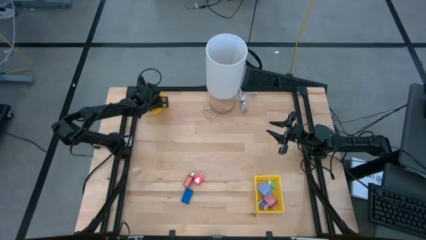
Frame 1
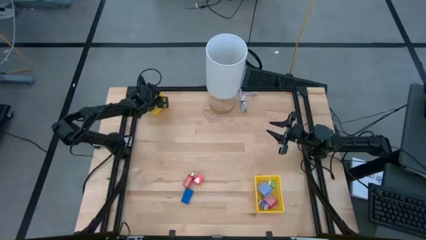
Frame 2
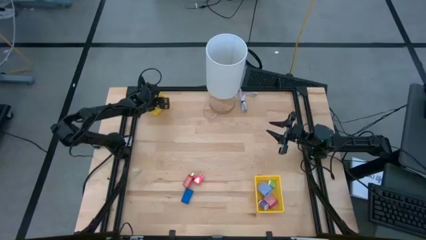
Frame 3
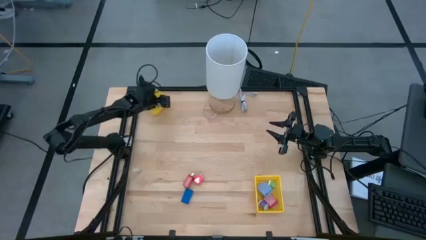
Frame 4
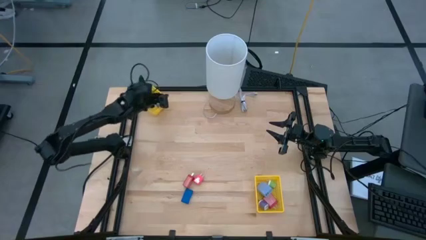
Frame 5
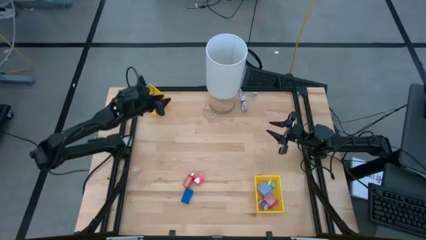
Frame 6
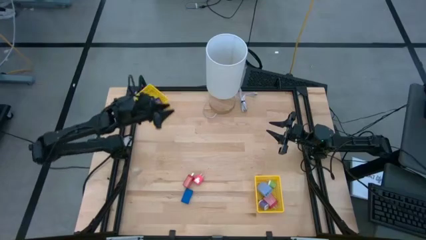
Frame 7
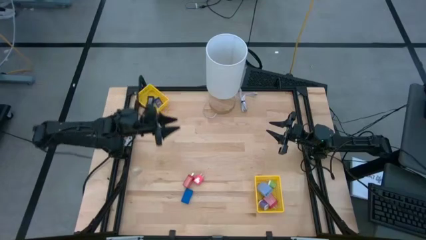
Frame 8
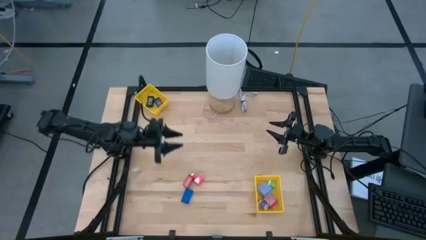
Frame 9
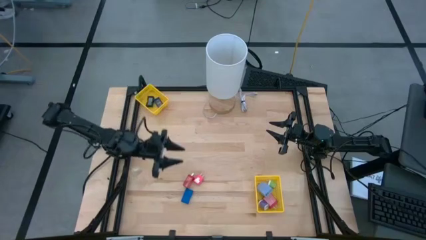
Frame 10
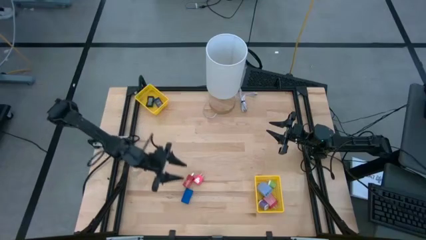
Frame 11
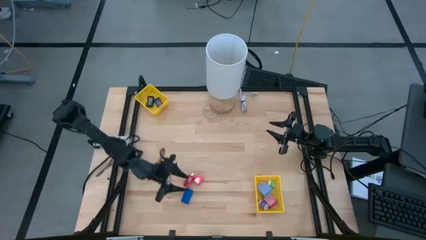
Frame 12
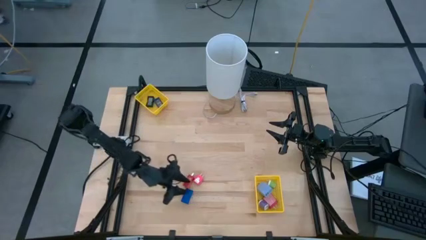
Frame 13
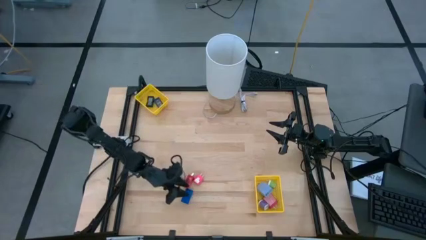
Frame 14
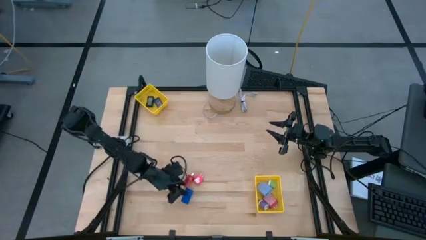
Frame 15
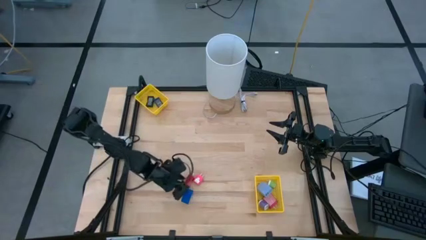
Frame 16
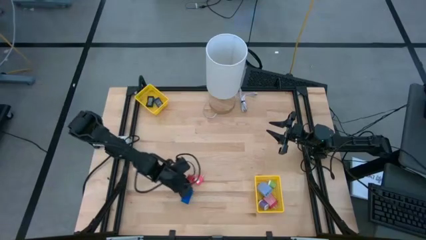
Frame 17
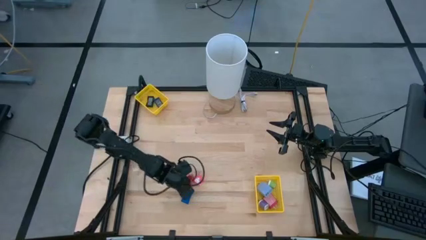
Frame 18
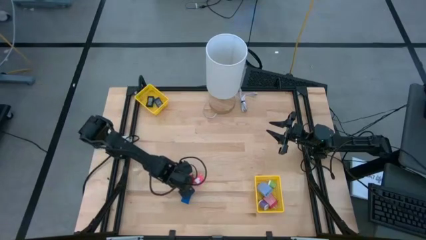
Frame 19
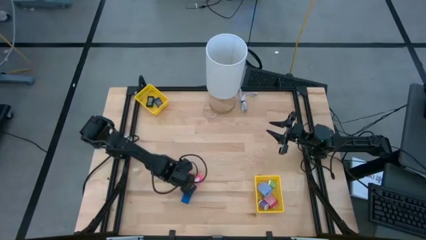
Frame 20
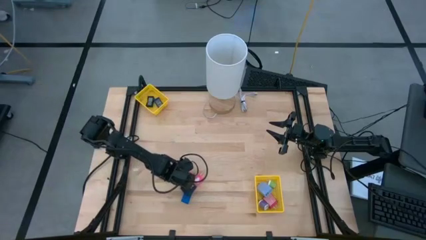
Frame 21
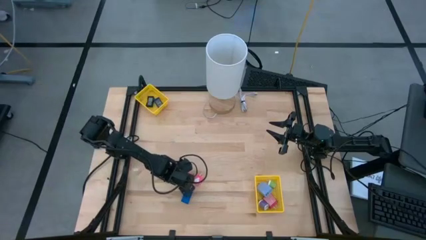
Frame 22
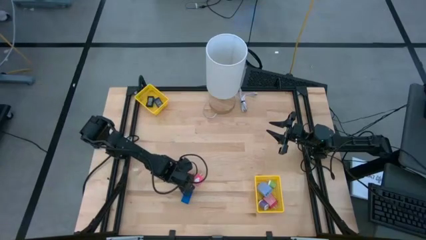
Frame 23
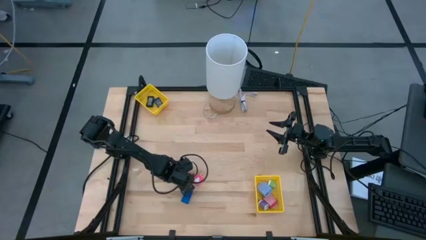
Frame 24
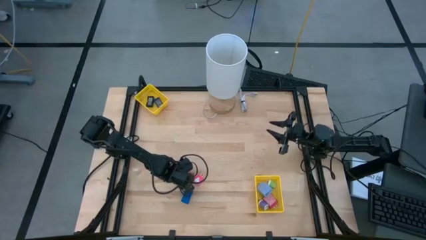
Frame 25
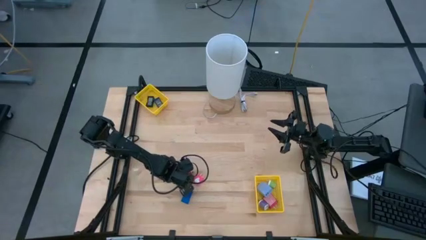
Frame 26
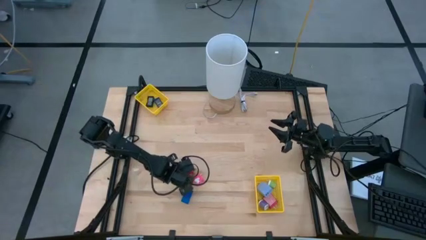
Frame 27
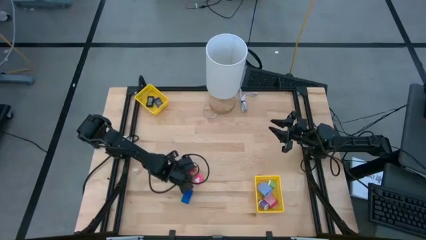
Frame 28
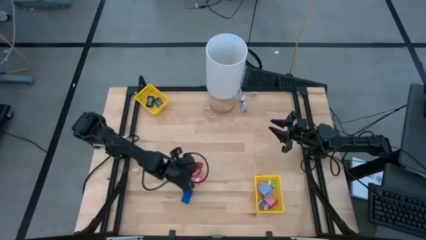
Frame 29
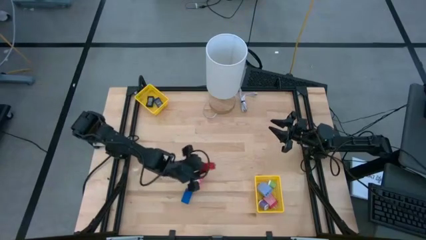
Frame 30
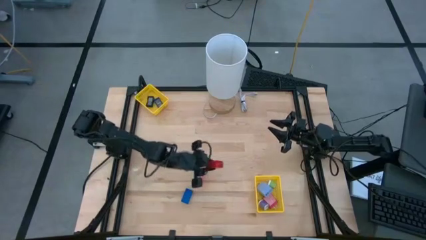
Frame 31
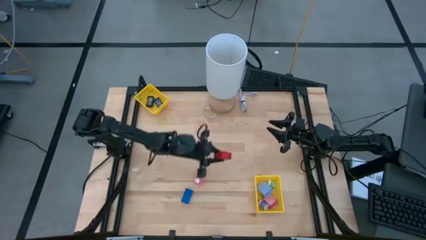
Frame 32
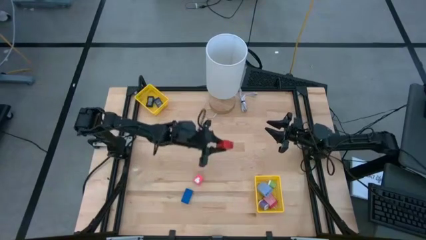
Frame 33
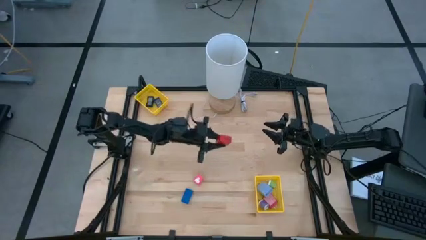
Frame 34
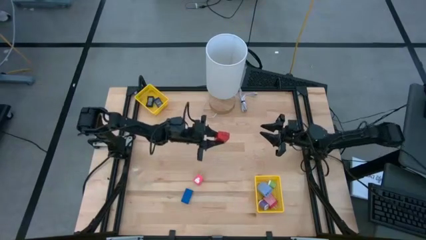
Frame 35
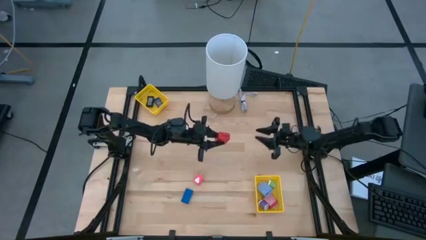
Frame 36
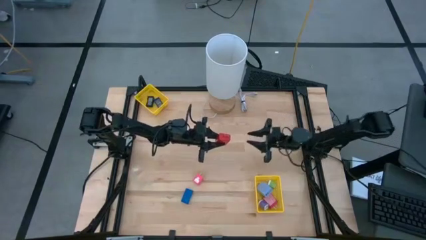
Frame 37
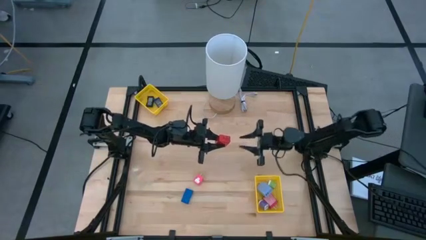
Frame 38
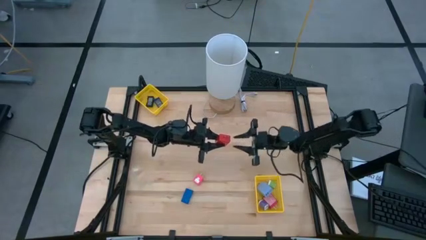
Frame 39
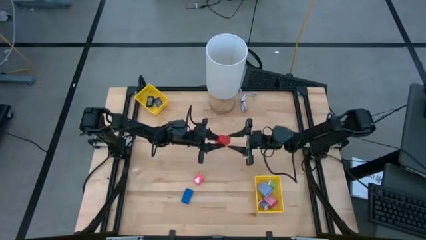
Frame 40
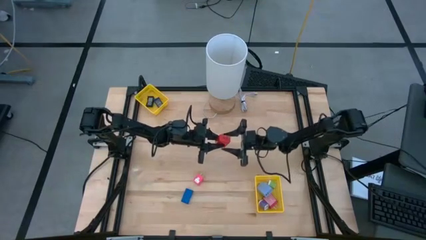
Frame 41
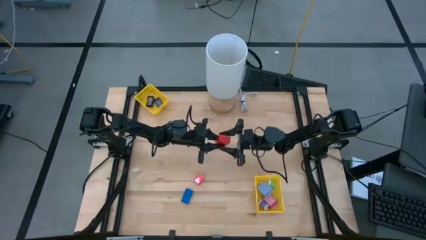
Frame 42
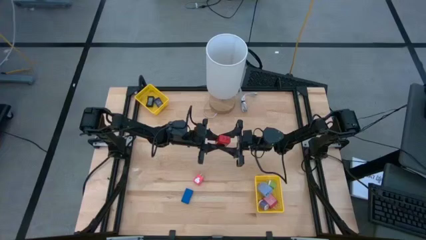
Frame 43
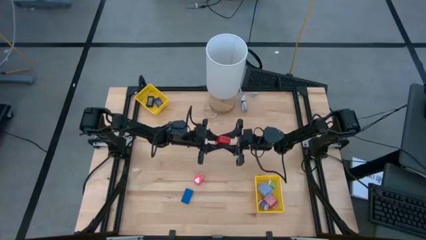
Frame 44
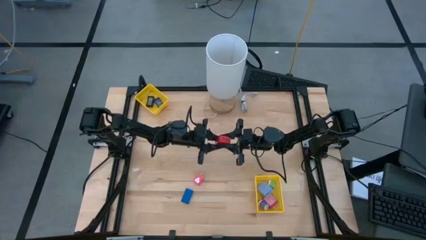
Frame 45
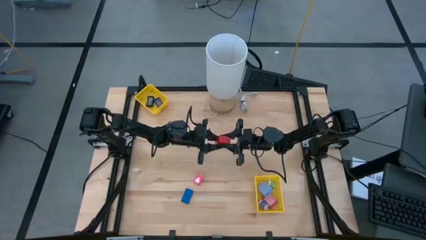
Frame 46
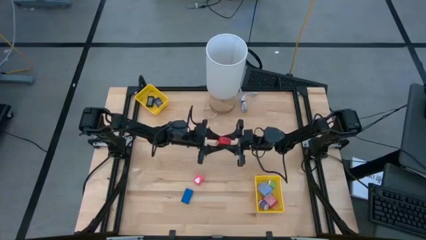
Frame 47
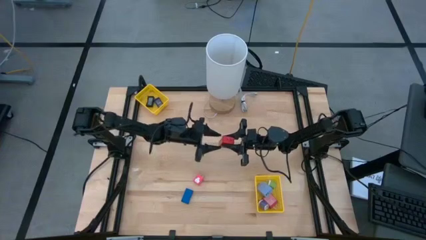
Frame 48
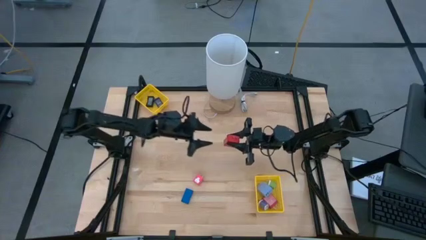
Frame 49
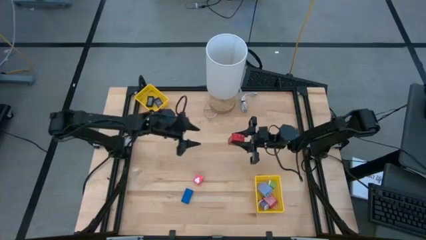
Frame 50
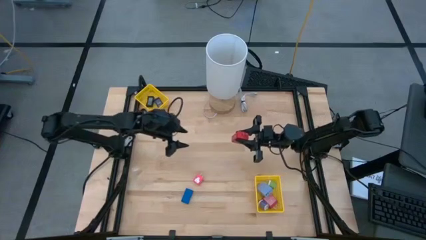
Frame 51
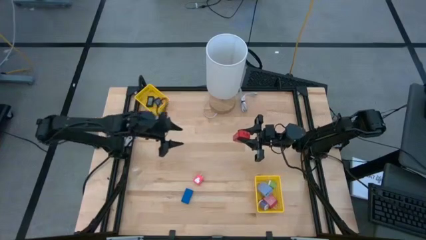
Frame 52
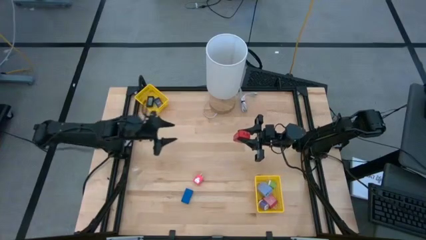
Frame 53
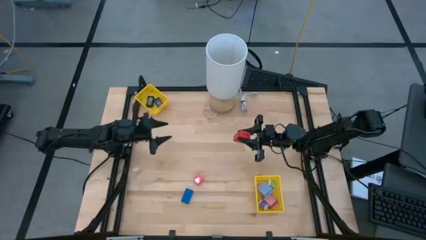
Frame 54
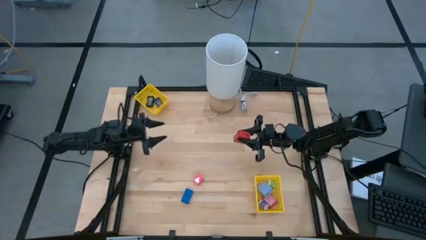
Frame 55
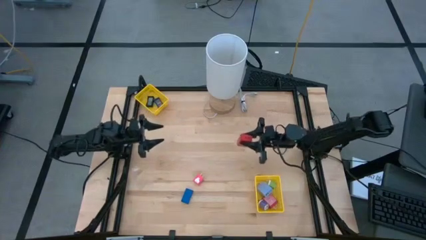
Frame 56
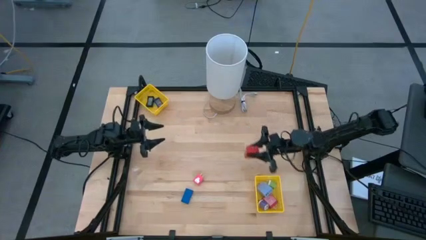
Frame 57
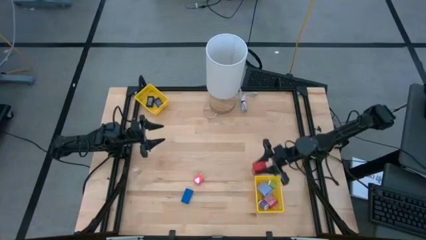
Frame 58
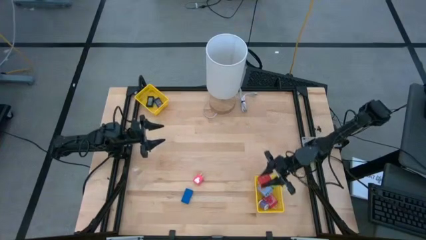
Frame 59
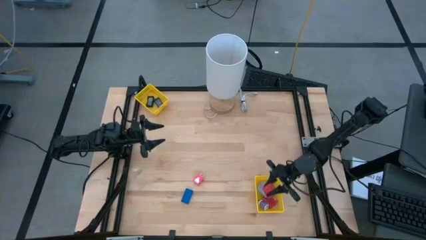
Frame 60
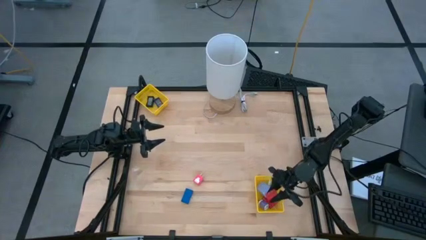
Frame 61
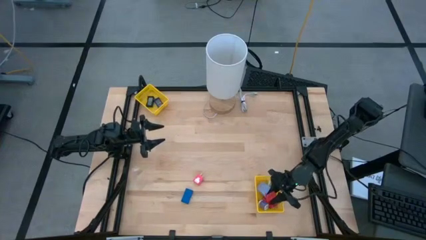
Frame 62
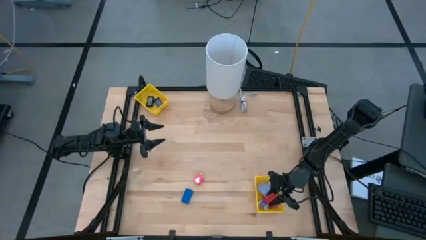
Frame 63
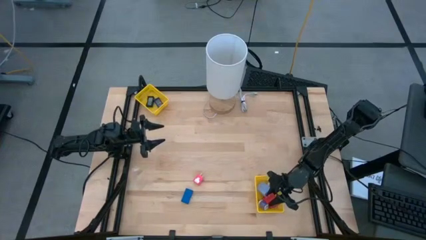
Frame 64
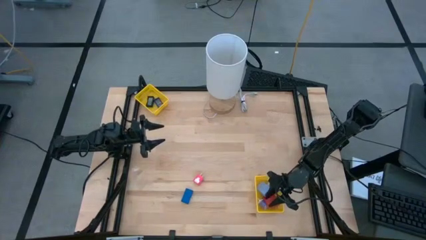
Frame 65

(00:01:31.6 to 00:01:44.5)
Task: Pick & Place Office items
Put the red charger adapter into the bottom yellow bin

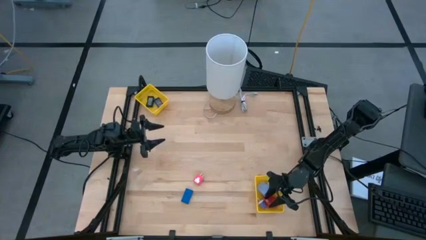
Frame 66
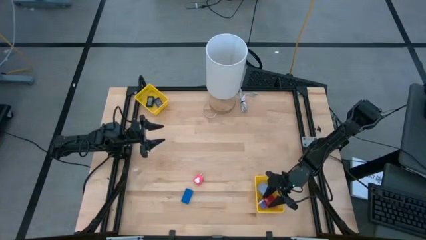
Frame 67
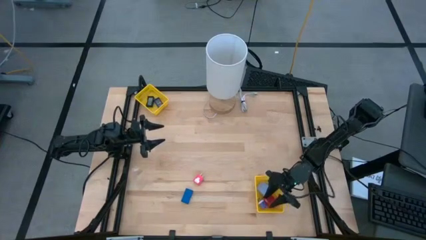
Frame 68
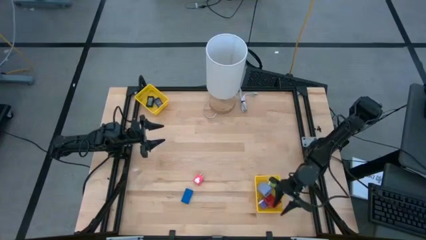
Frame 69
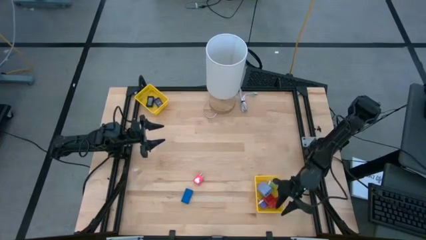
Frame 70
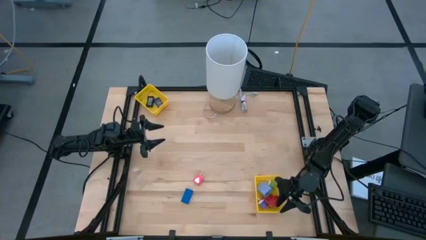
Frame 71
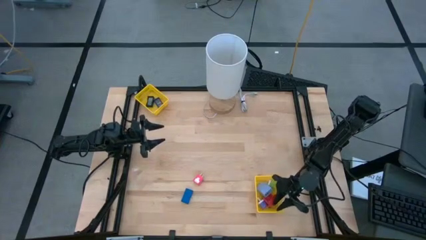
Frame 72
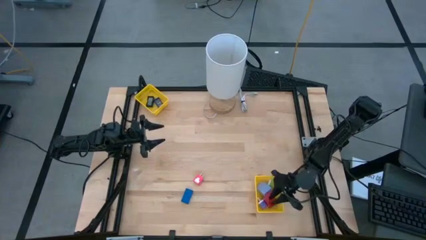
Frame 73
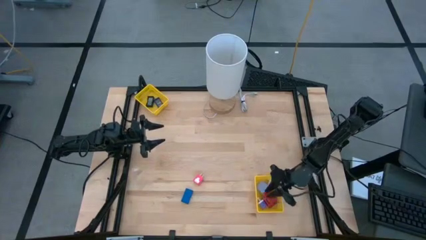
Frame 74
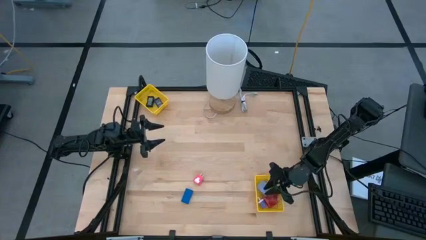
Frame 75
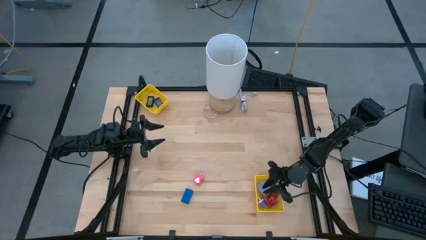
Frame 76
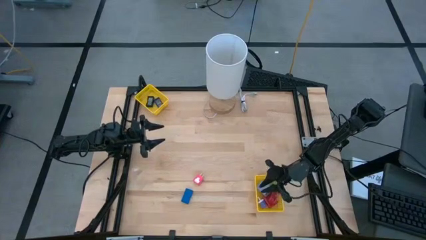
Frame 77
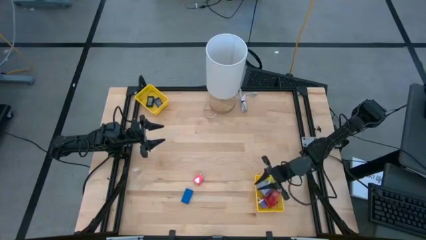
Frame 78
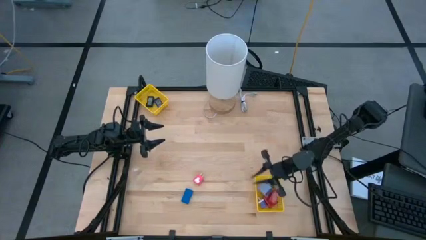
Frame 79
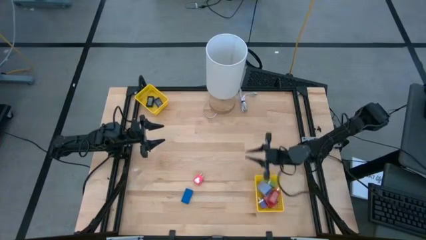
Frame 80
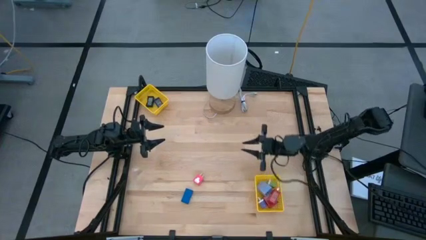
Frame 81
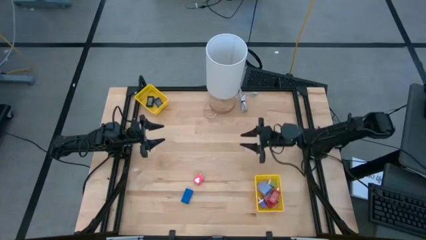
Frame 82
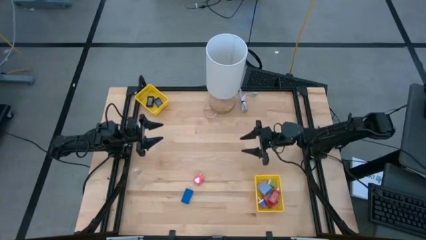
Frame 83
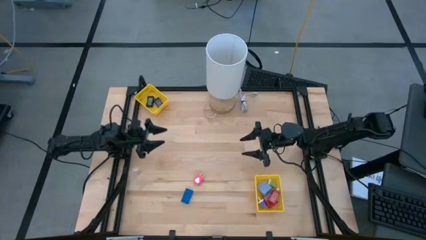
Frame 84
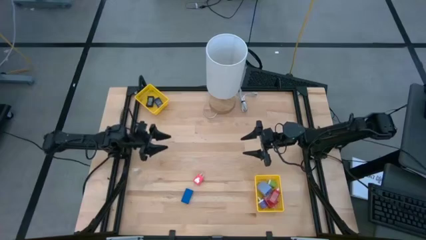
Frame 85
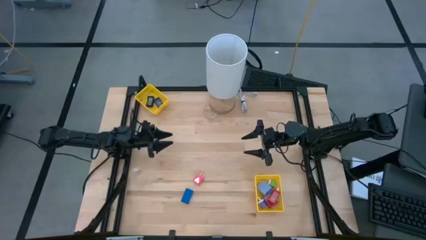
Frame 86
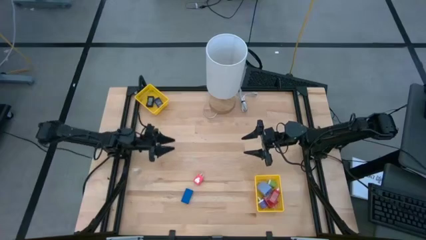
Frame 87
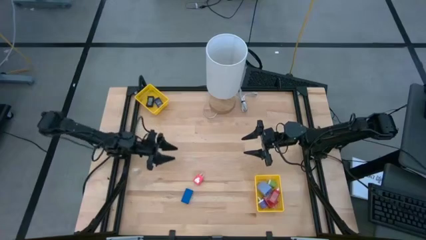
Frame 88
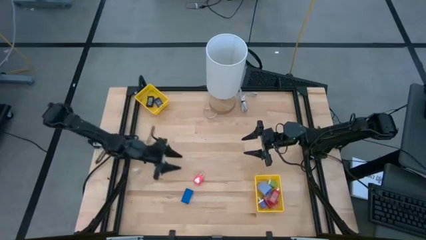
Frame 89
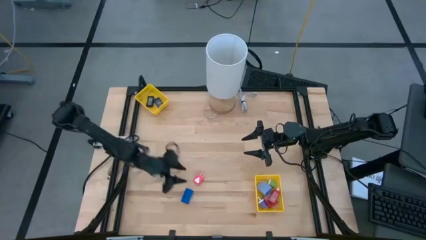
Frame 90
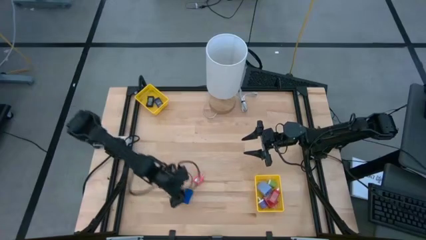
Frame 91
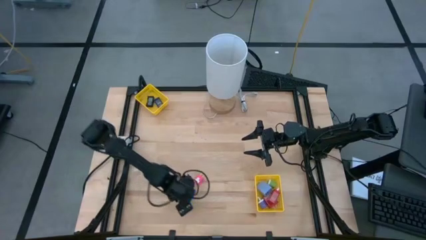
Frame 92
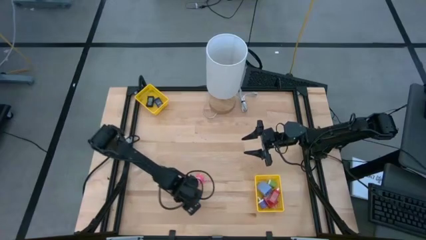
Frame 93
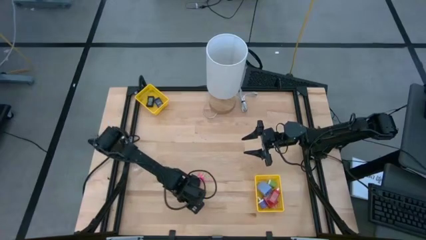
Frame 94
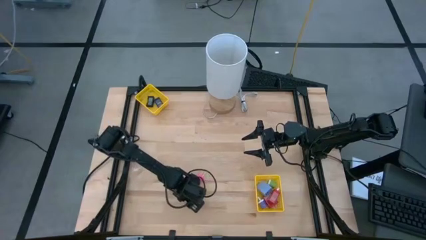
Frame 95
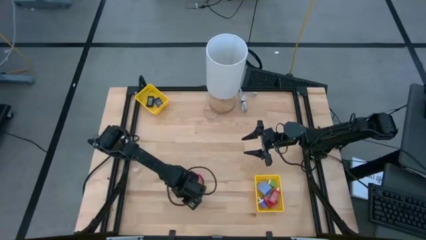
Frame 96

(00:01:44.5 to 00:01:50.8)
Put the blue digital timer into the top yellow bin
